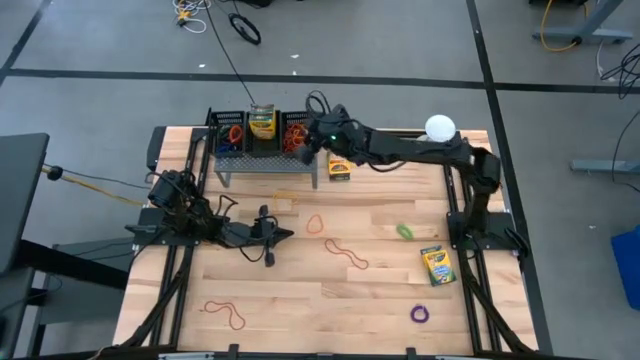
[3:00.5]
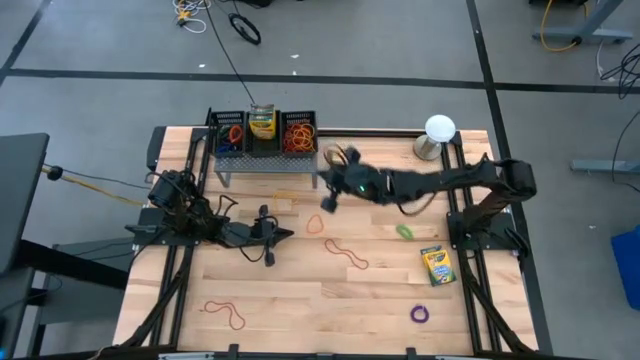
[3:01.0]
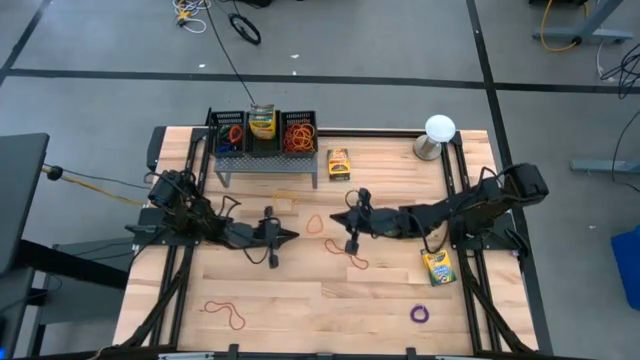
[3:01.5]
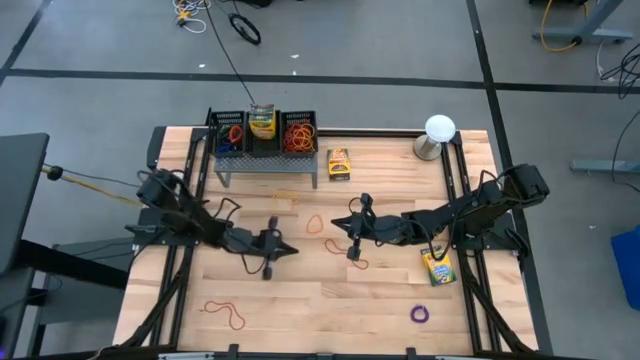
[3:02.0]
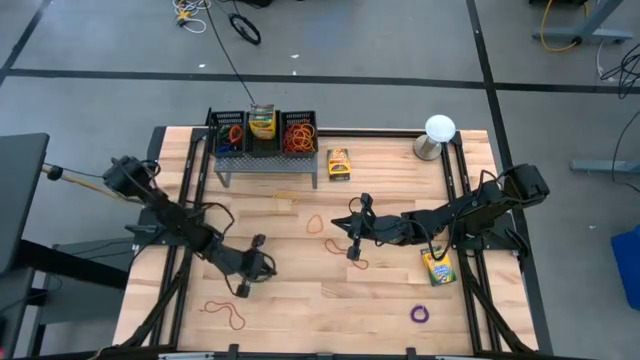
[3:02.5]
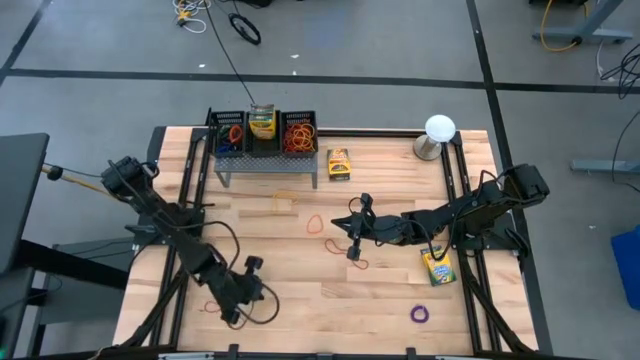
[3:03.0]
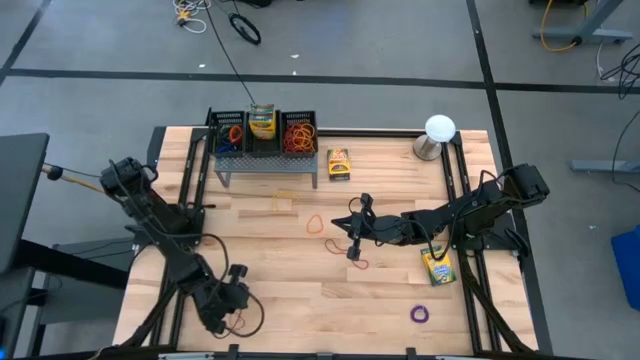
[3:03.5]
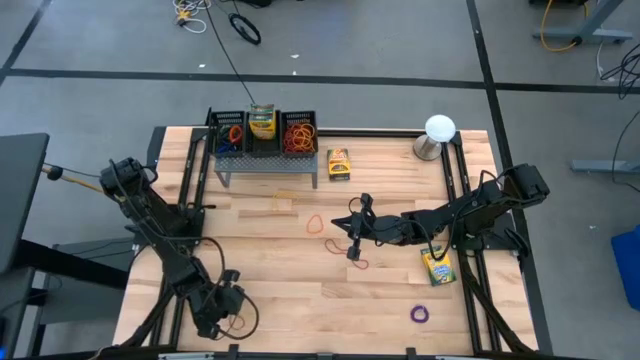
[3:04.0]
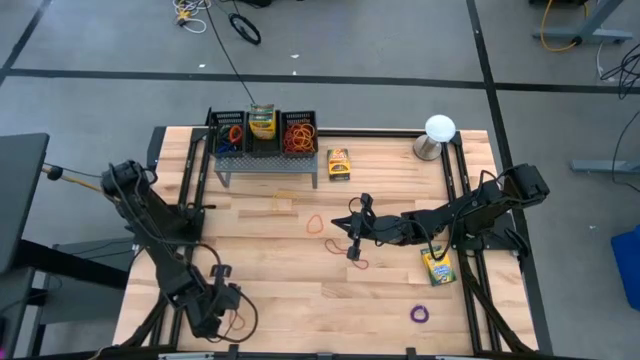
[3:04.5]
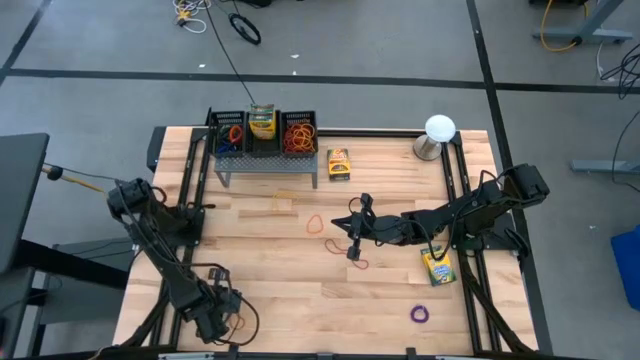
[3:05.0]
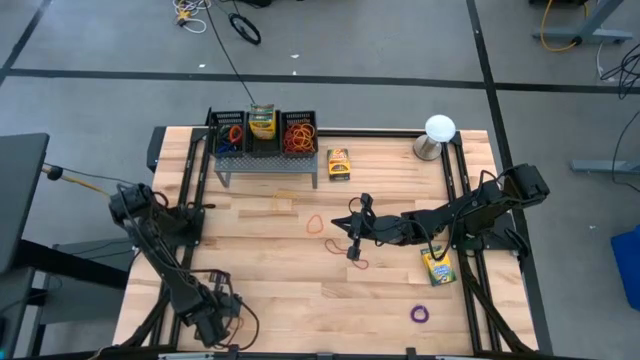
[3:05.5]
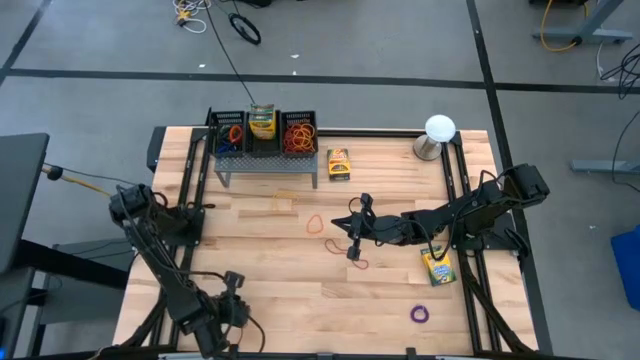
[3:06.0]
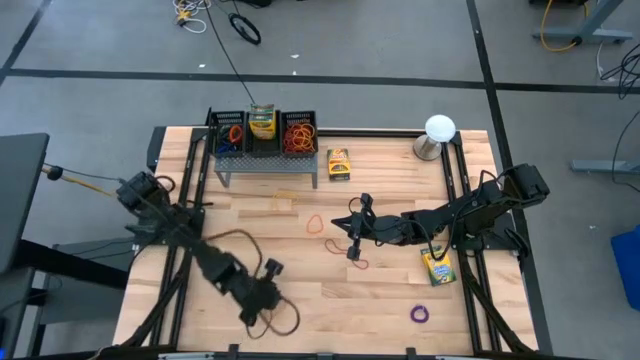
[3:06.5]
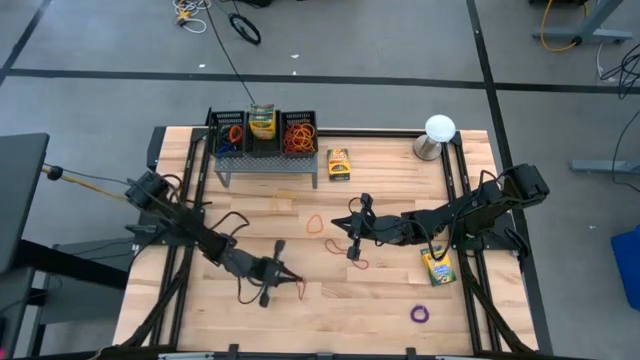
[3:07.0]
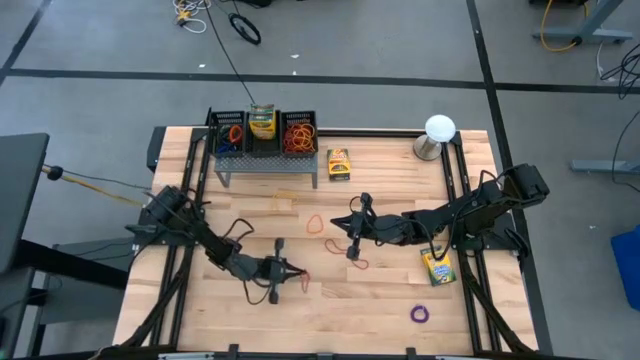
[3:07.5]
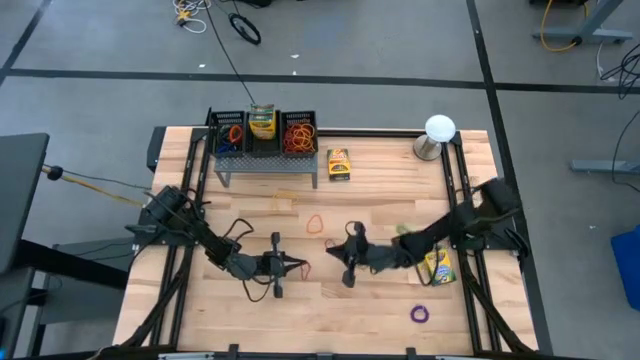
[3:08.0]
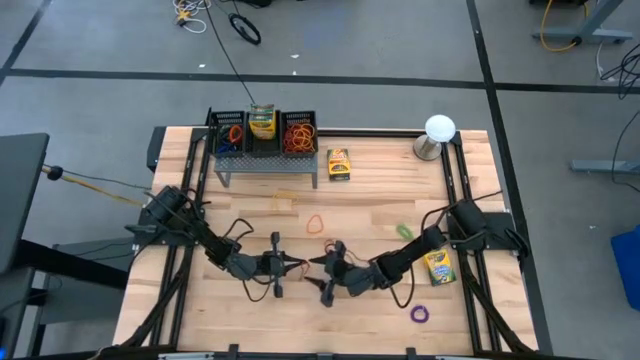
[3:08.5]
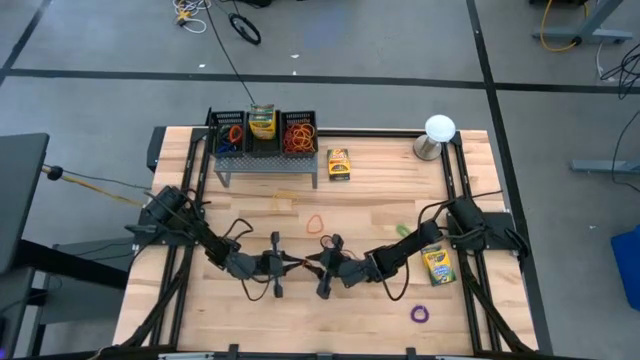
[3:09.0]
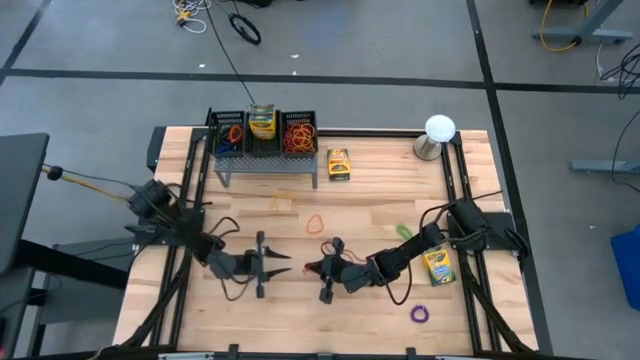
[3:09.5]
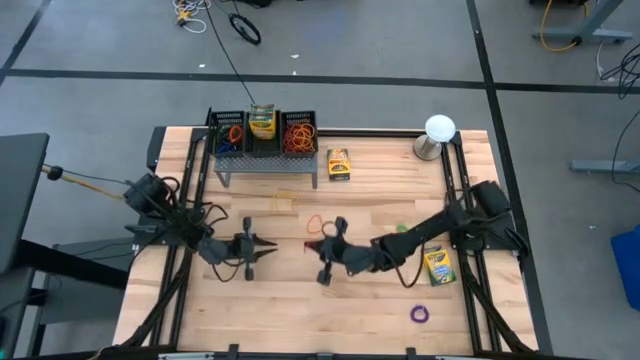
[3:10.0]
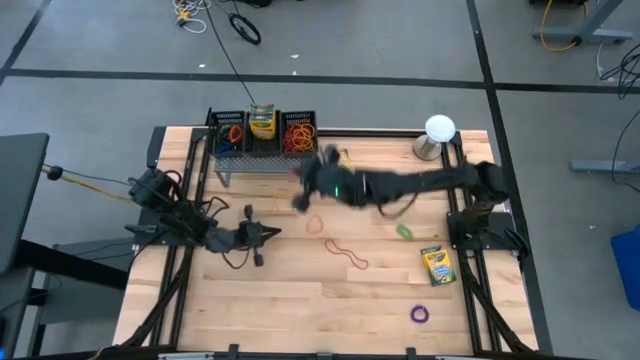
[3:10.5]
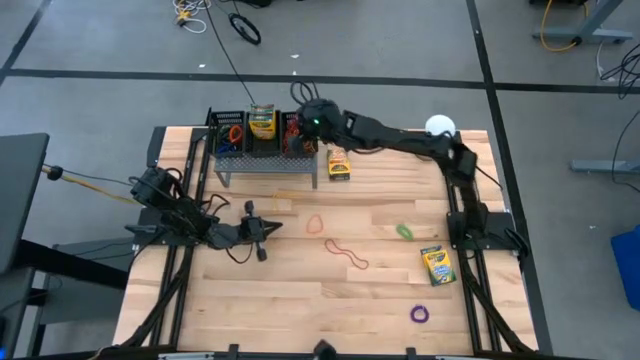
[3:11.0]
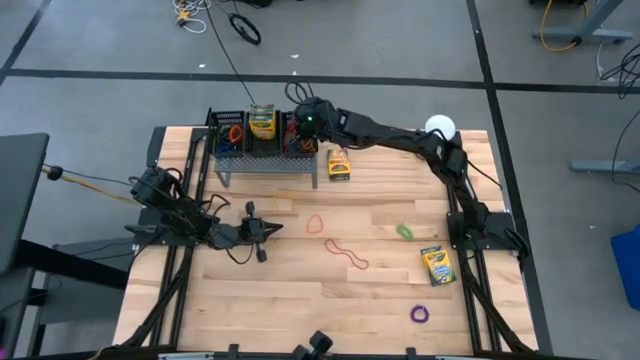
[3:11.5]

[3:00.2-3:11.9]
Task: Pick & Place Office Desk Supplies
Put the red rubber band into the right black bin

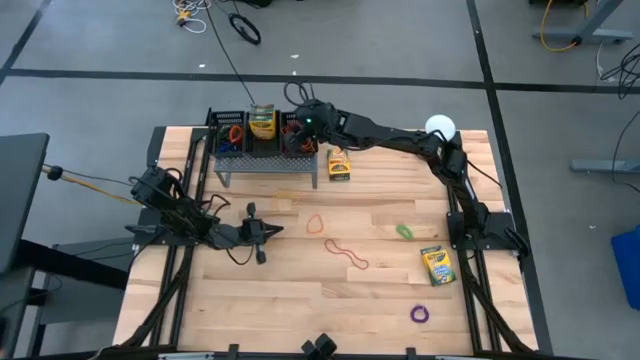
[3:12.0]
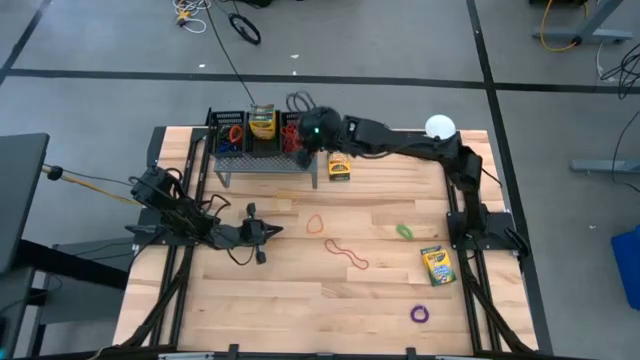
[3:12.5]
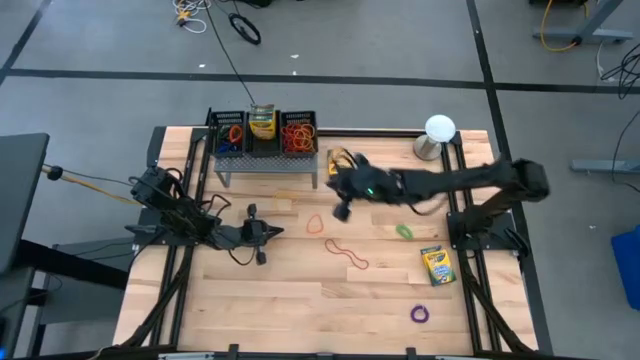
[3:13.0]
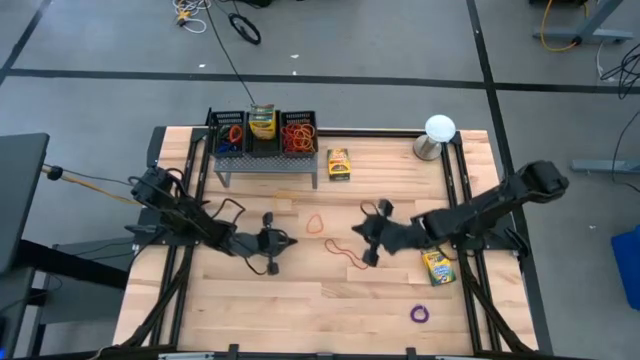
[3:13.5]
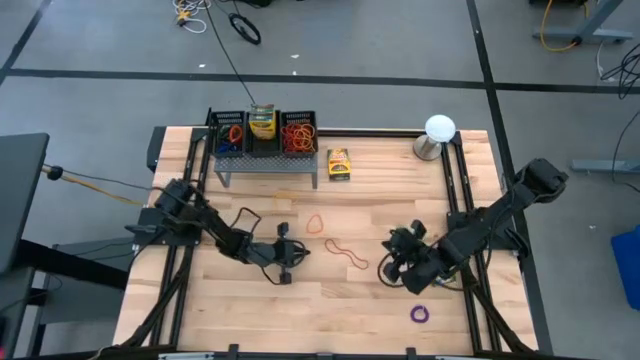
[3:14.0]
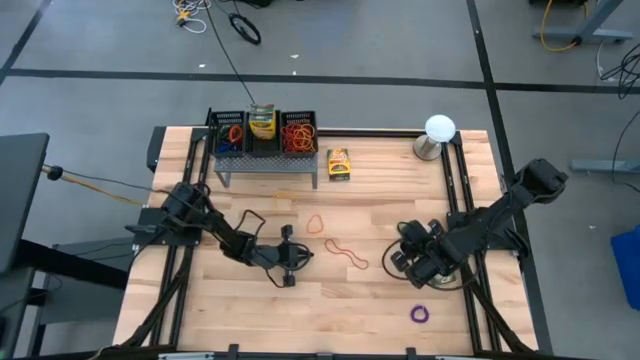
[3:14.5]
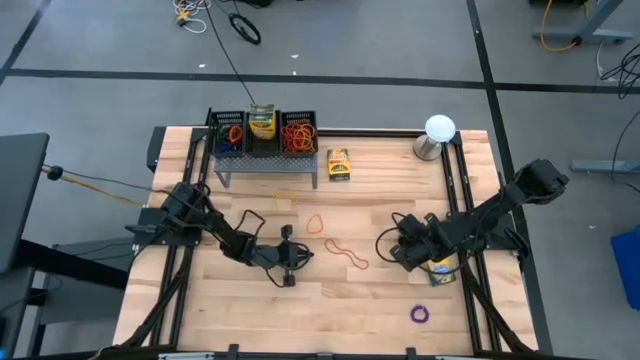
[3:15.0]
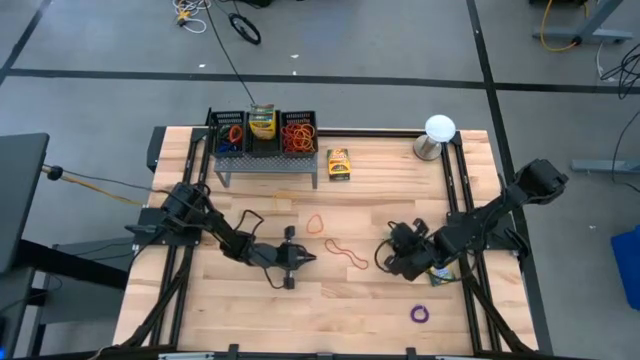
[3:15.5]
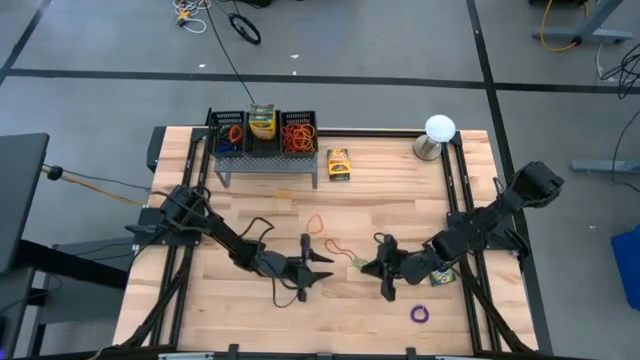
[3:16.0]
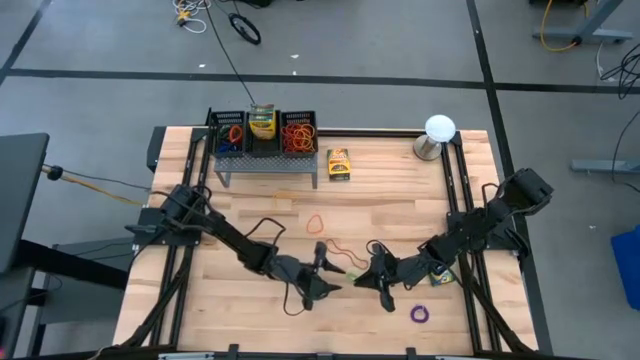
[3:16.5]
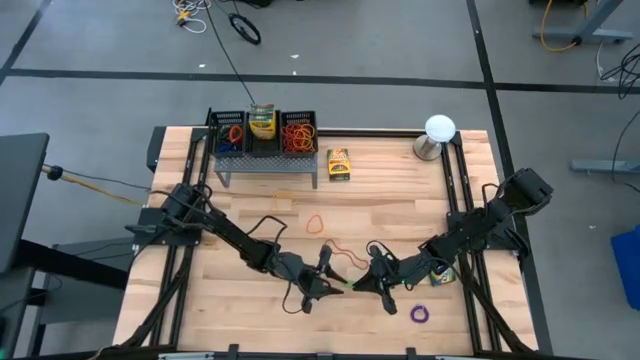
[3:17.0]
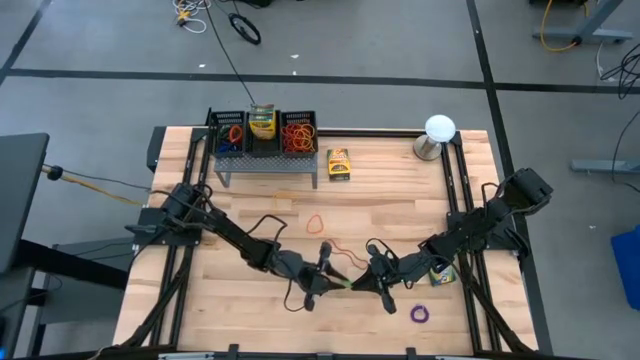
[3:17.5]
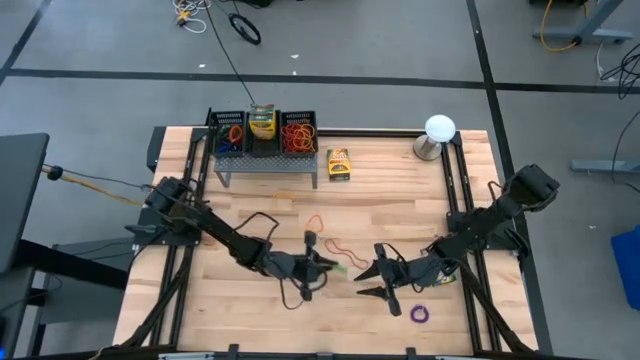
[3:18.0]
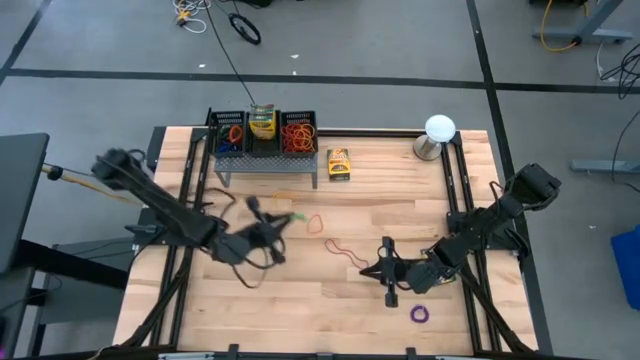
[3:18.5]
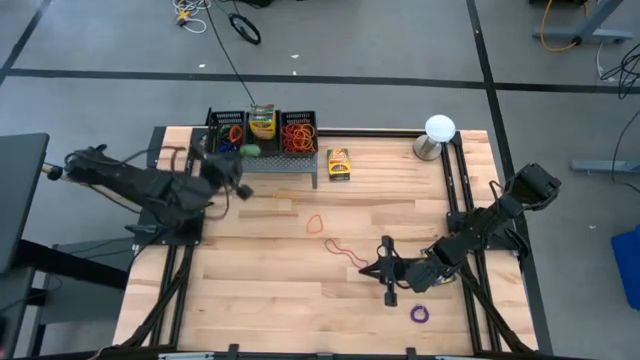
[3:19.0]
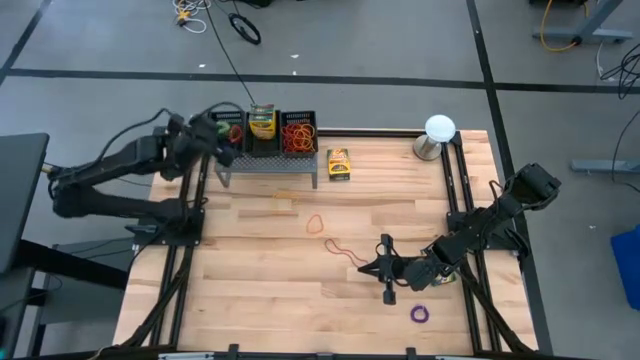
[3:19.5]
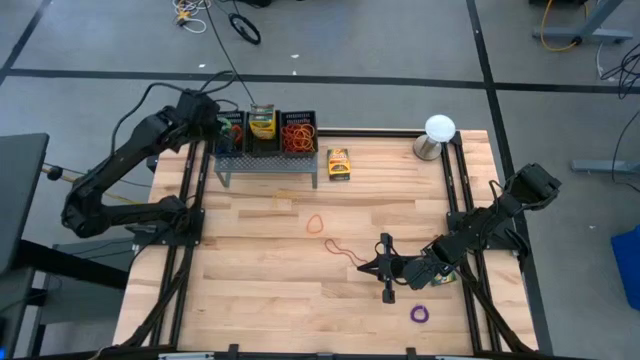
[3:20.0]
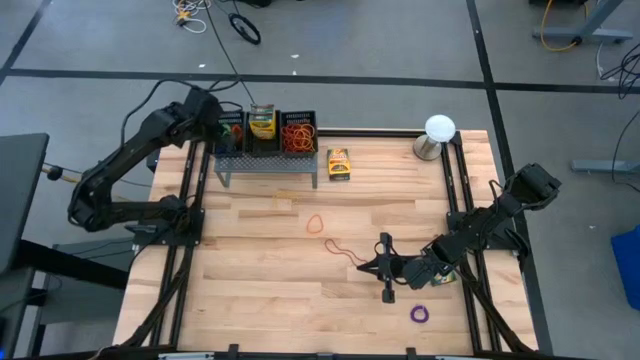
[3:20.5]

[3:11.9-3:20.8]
Put the green spiral keychain into the left black bin
